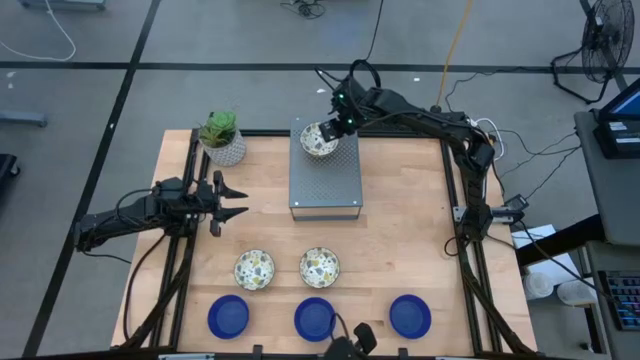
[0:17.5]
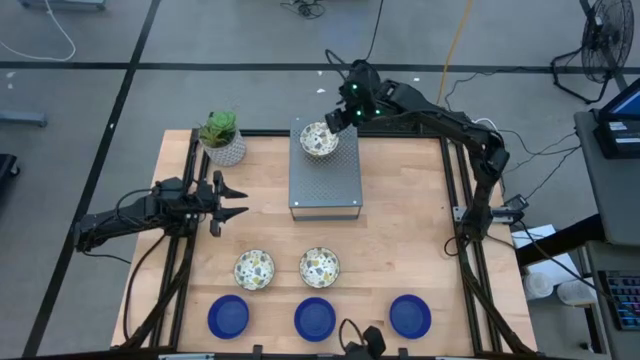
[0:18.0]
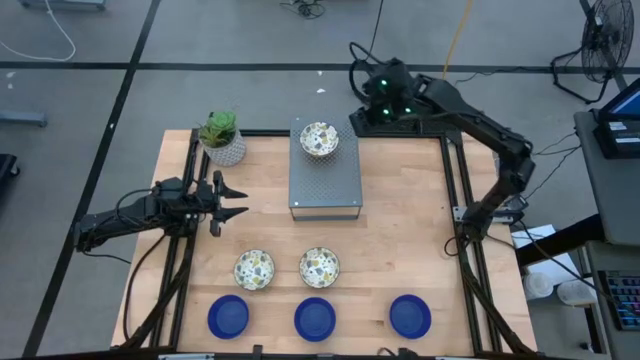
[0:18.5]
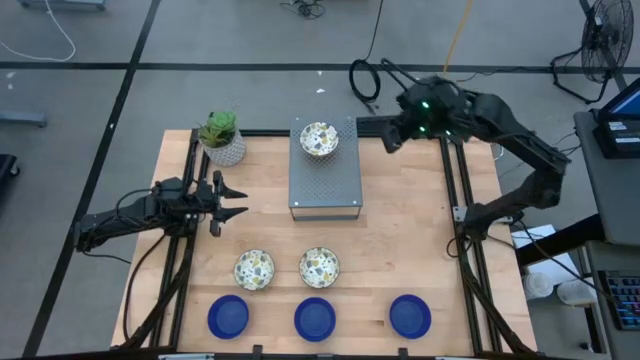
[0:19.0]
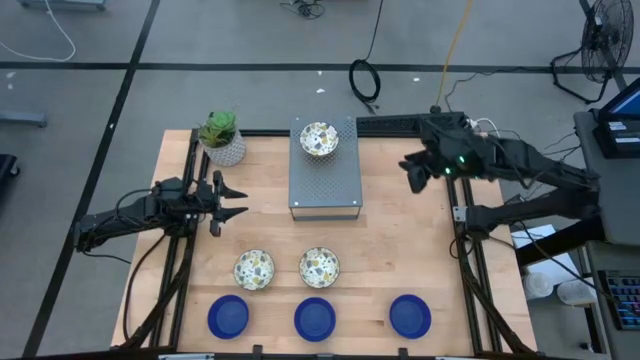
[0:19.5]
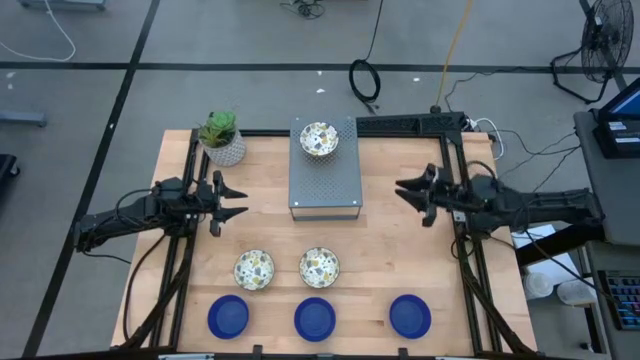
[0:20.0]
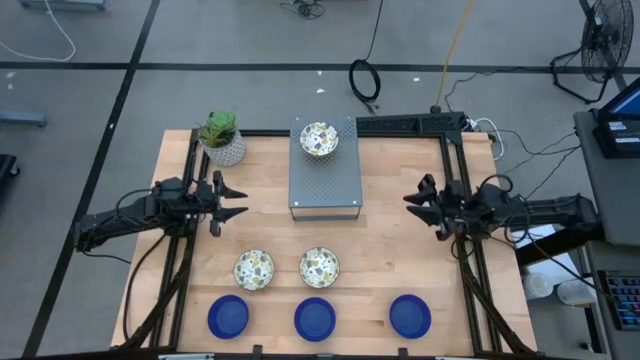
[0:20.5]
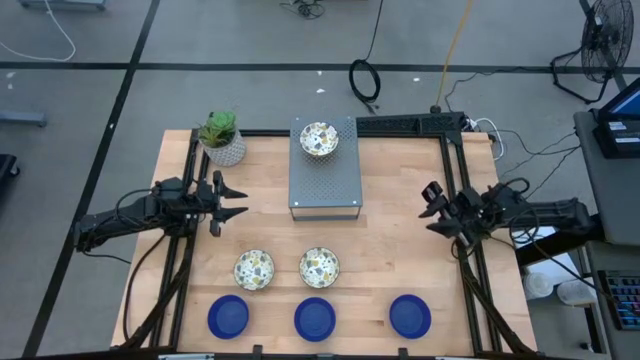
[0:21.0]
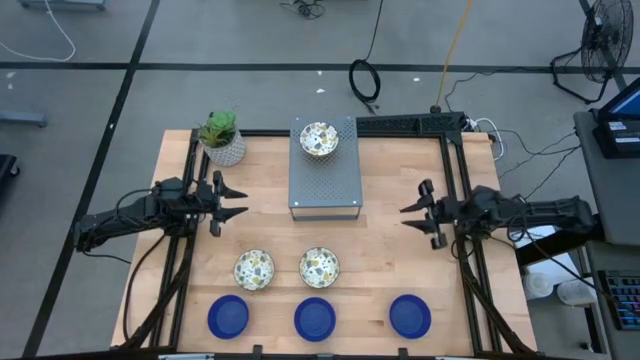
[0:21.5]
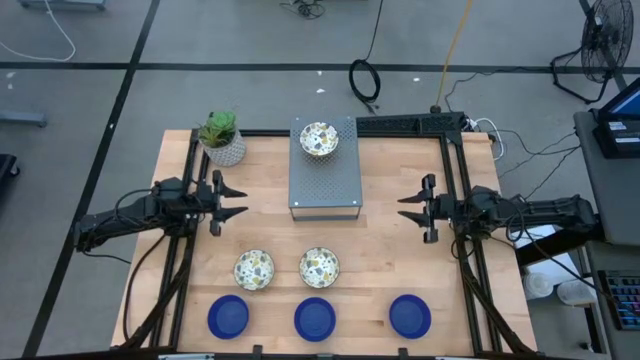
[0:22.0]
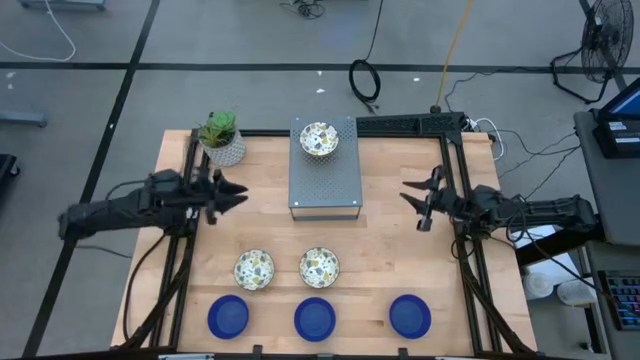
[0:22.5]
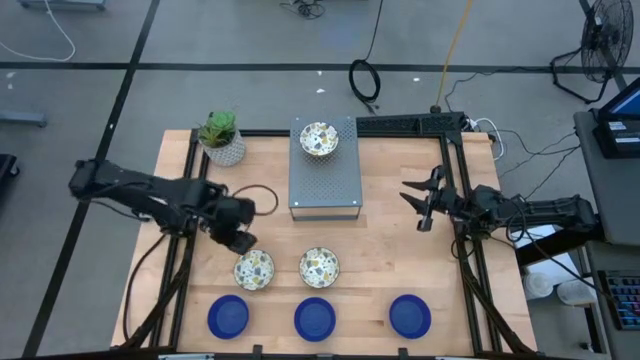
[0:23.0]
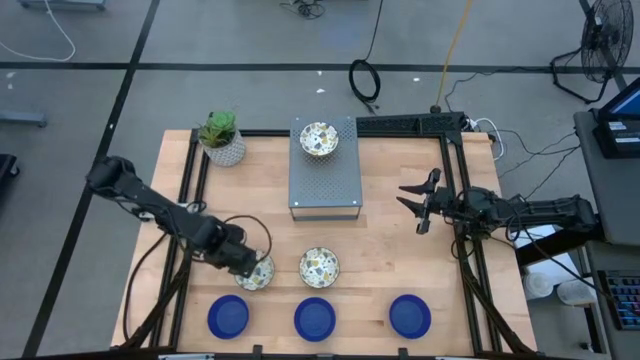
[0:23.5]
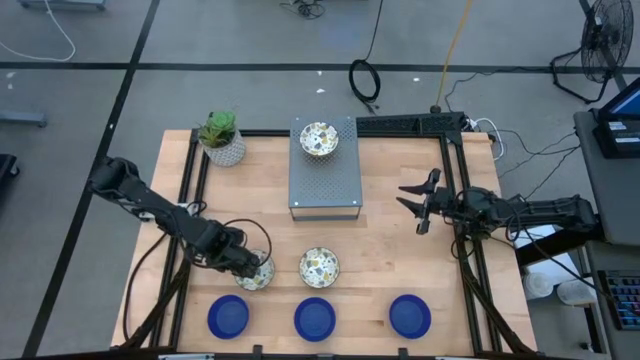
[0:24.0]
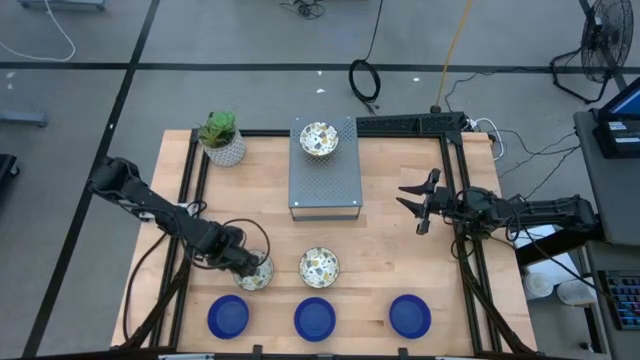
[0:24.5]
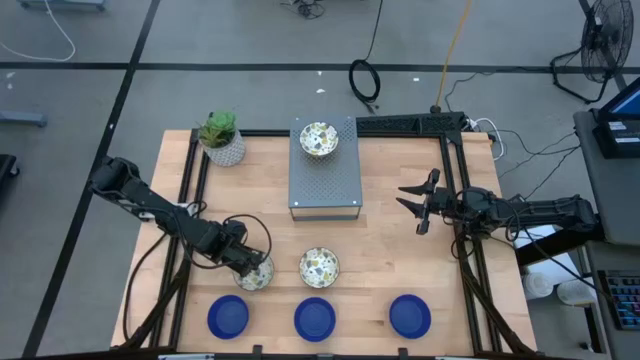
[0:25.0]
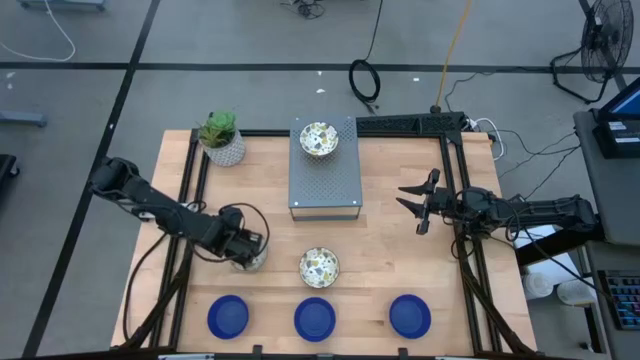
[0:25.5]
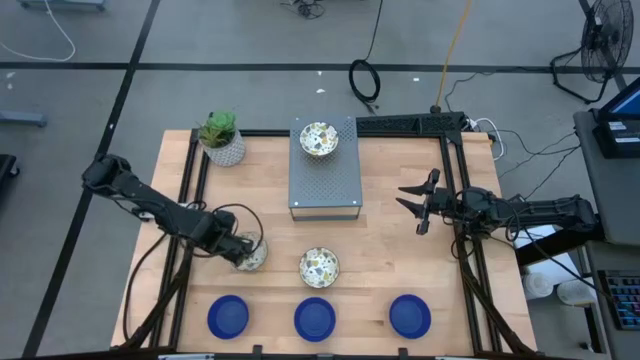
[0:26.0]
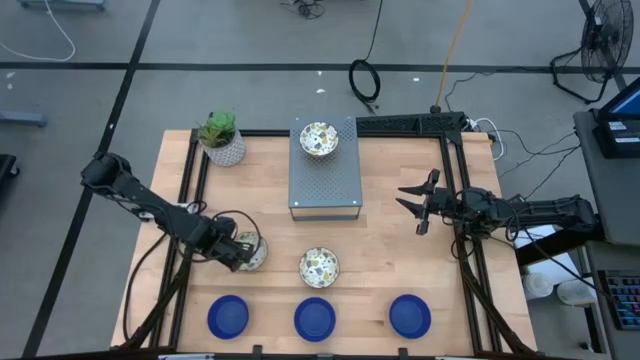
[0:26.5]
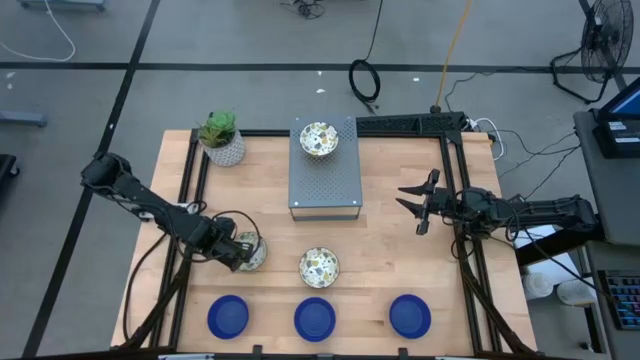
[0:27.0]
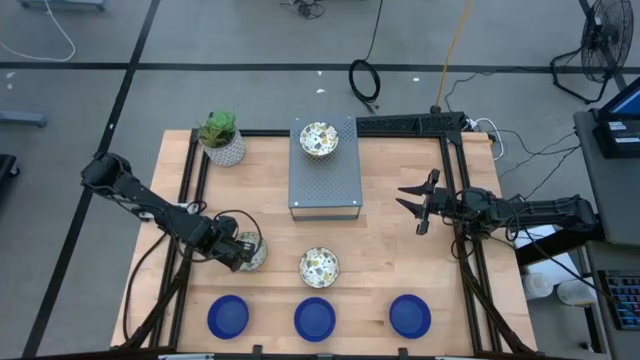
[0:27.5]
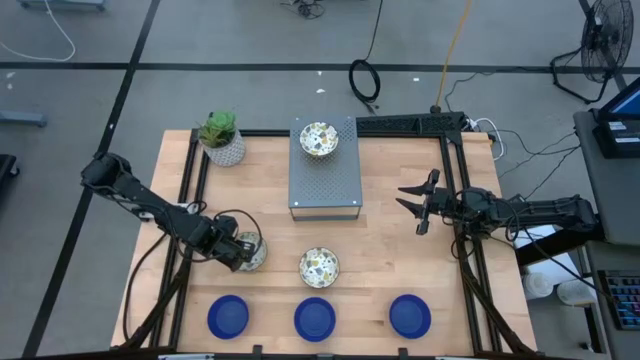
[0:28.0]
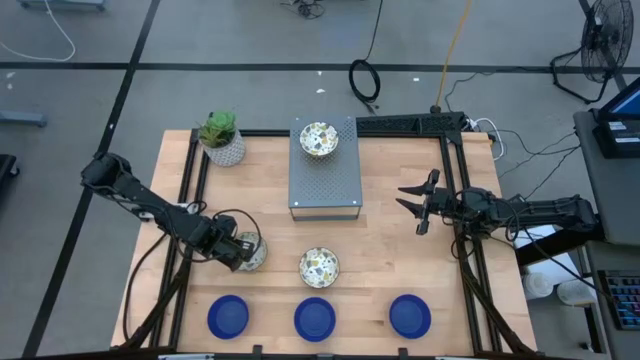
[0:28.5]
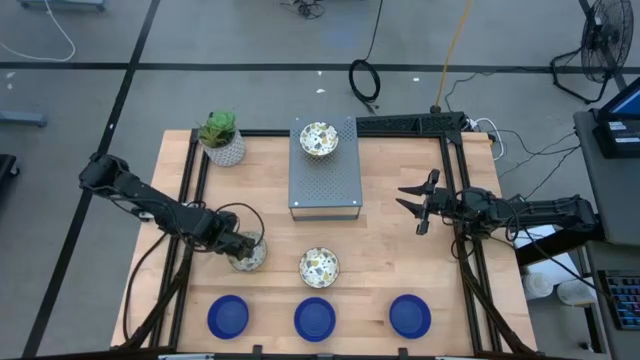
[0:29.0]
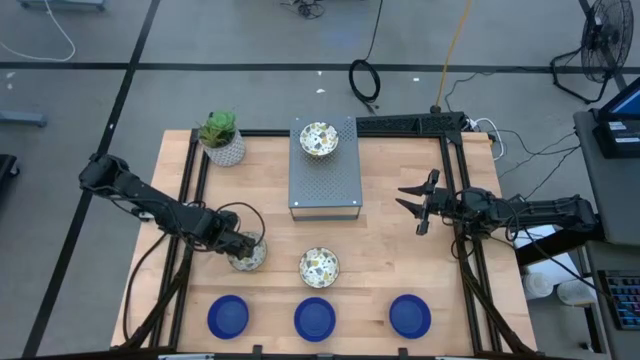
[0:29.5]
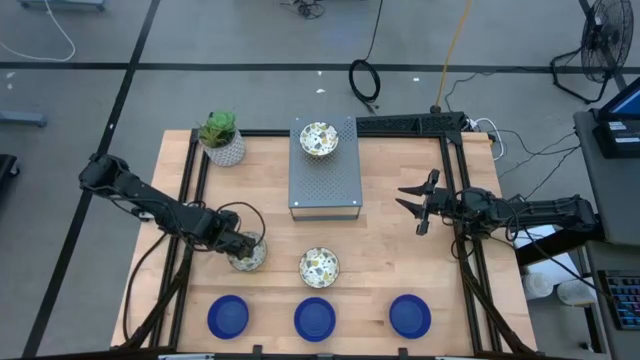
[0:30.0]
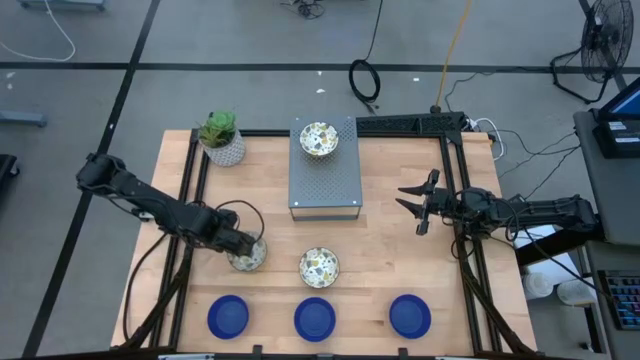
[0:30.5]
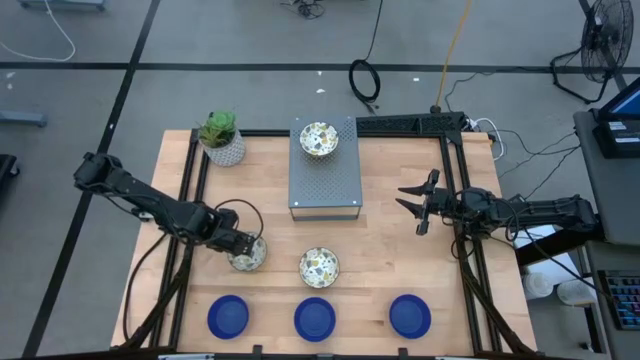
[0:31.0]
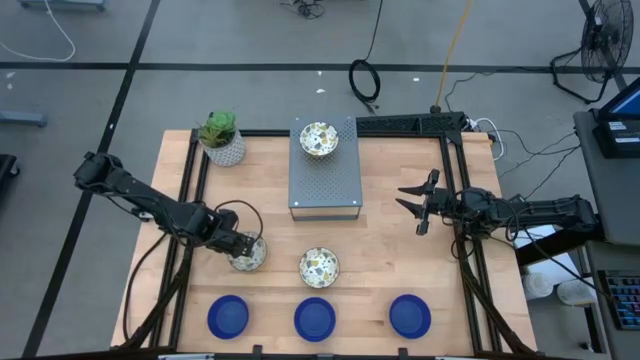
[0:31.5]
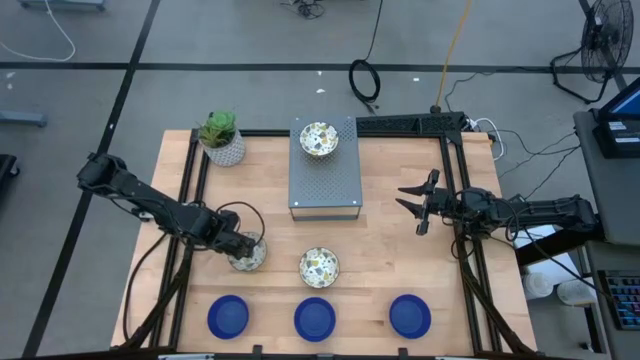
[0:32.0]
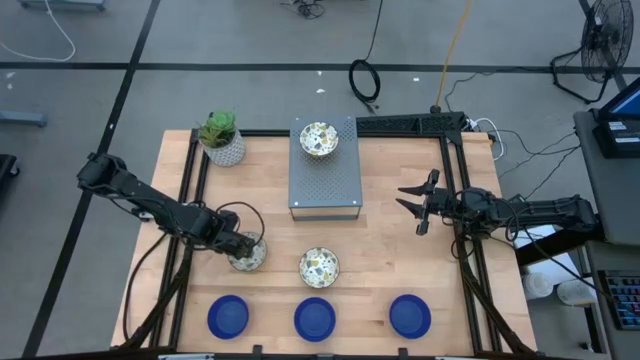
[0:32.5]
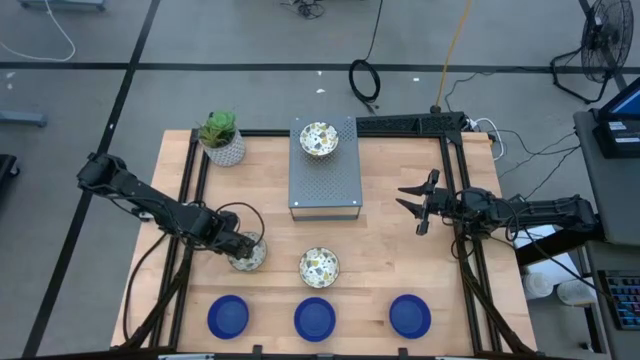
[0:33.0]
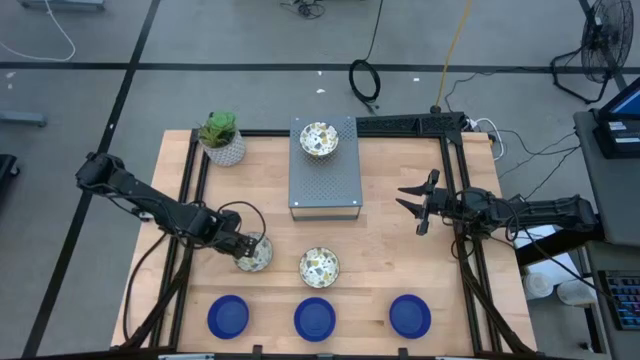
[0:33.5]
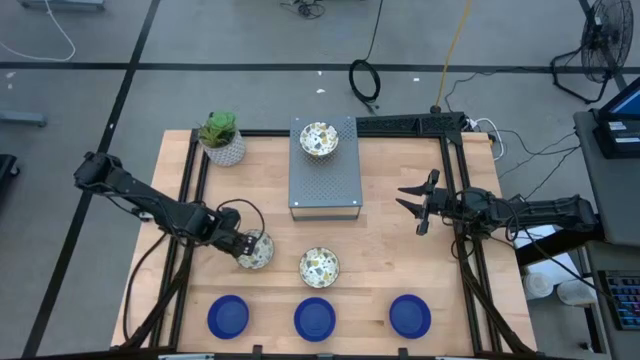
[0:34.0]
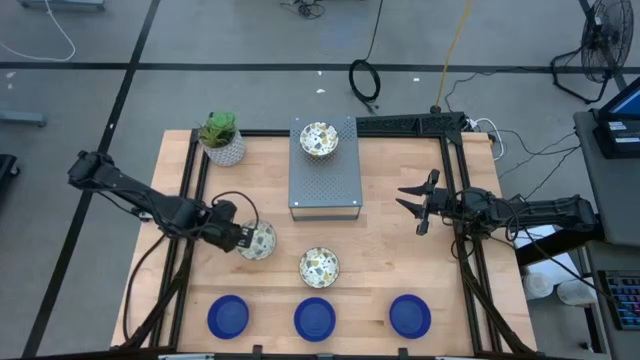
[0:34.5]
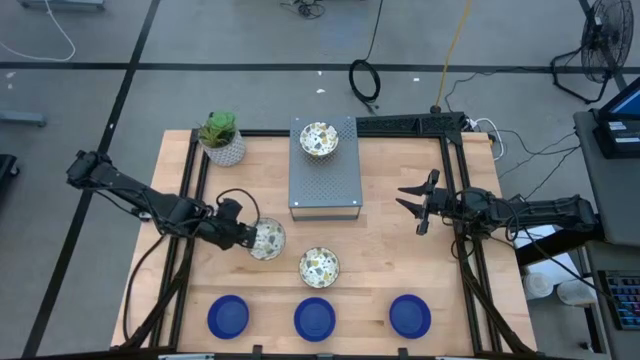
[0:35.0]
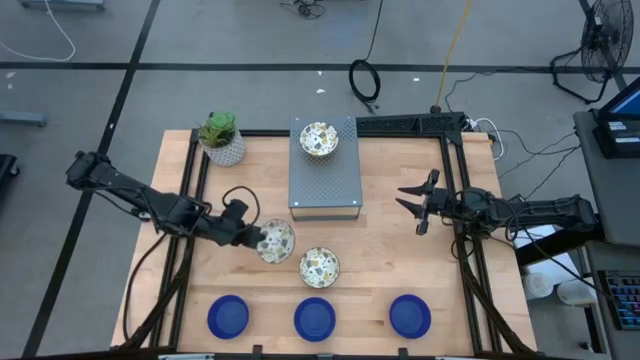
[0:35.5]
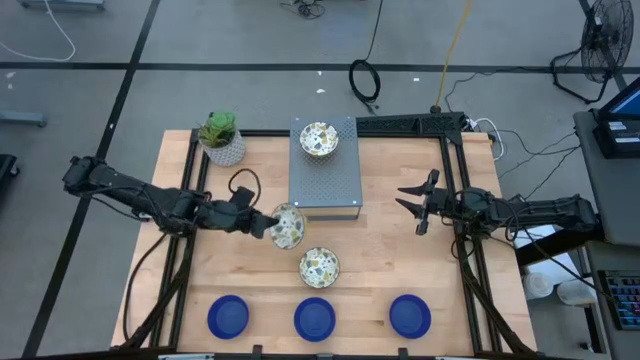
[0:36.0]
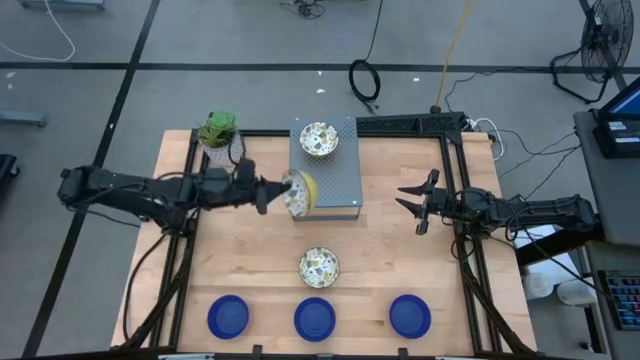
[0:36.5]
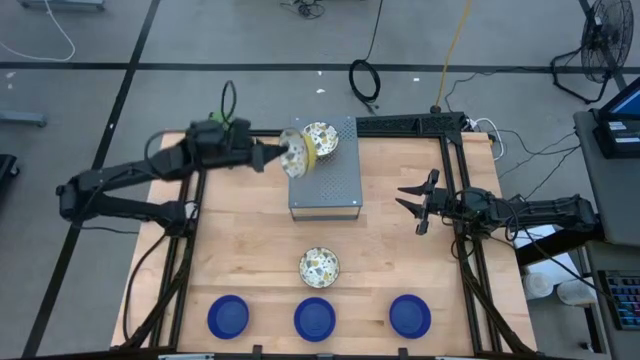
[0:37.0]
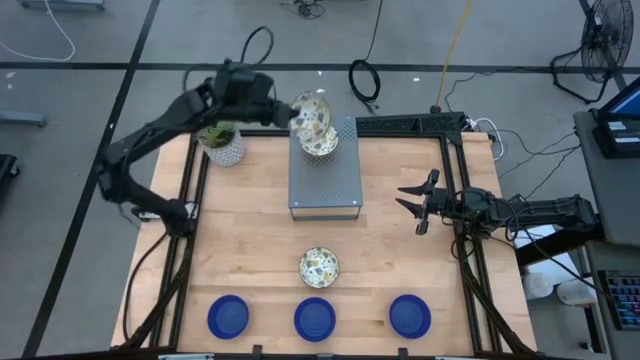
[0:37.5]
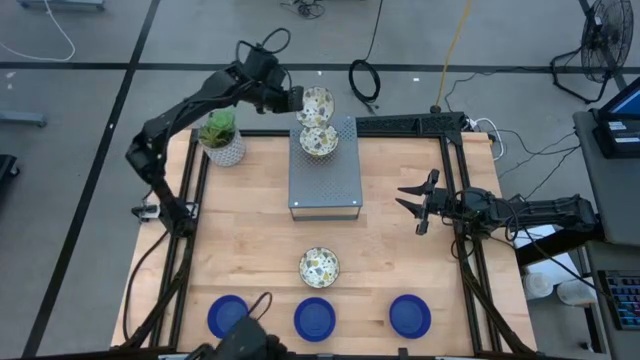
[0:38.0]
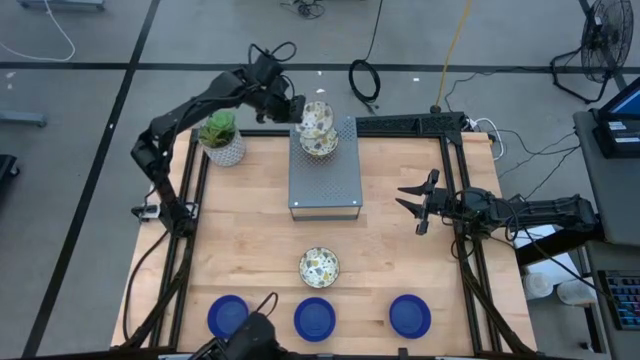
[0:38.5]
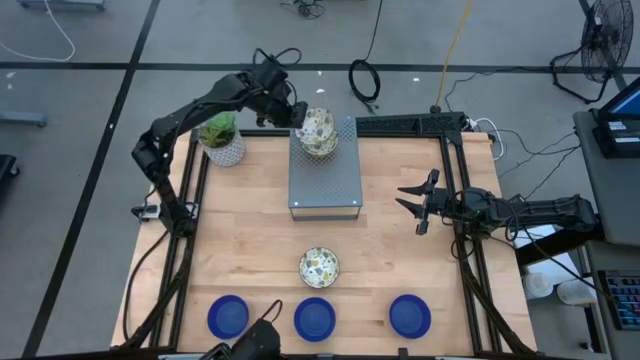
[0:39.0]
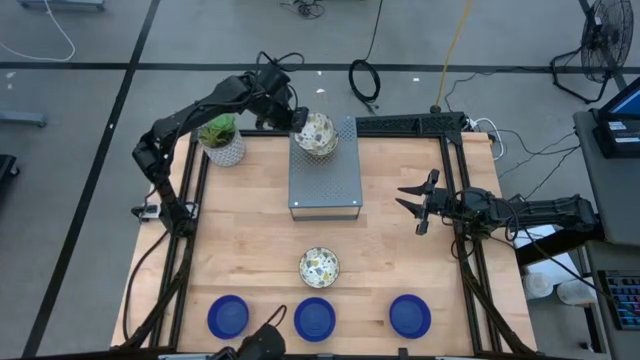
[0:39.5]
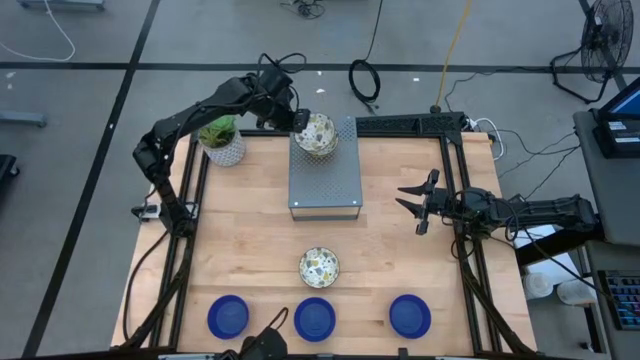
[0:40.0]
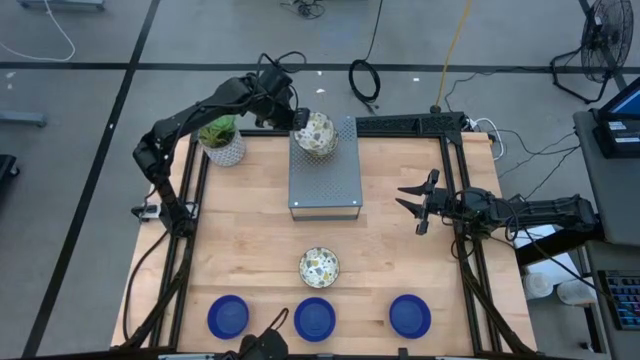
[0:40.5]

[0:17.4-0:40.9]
Task: Pick & Place Mini bowls
Stack the left yellow patterned bowl on the yellow patterned bowl on the shelf
